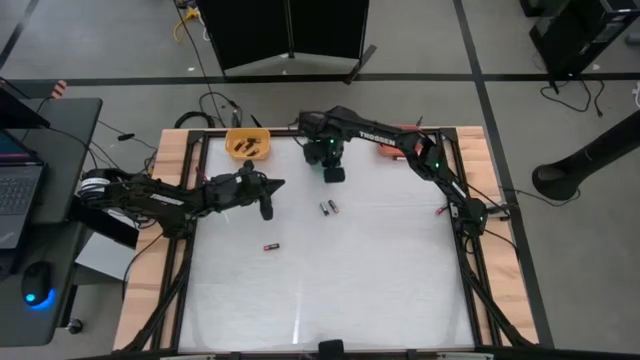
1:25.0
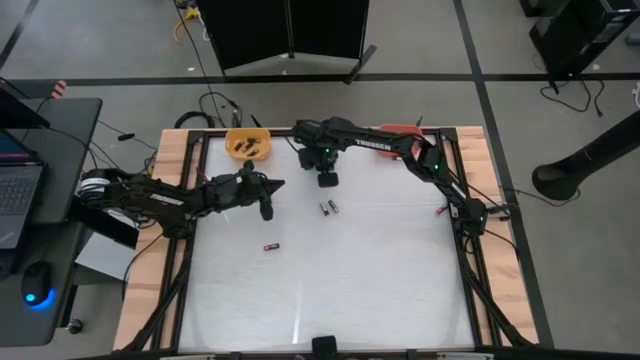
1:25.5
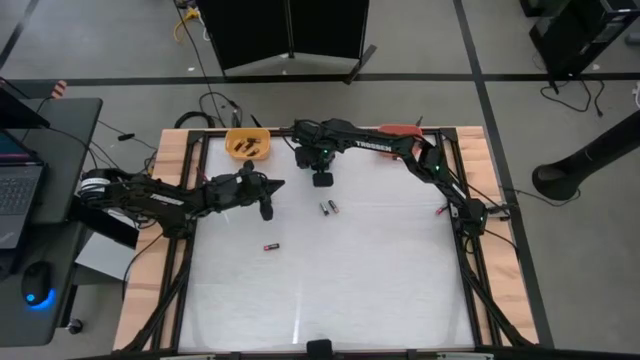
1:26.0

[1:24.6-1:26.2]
Task: Sort batteries
Adjust the green bin

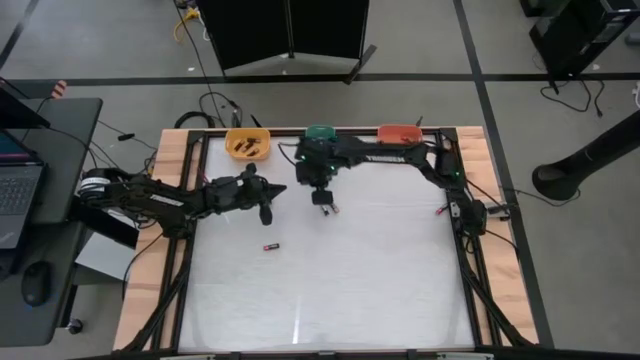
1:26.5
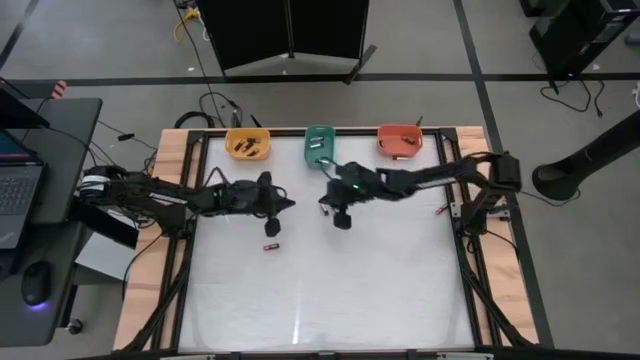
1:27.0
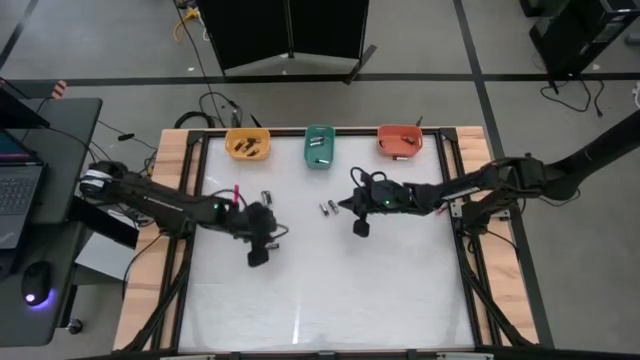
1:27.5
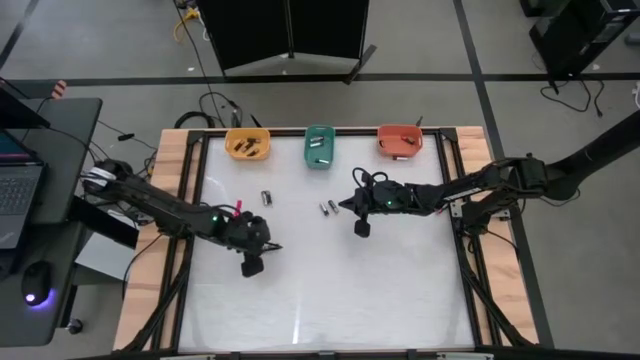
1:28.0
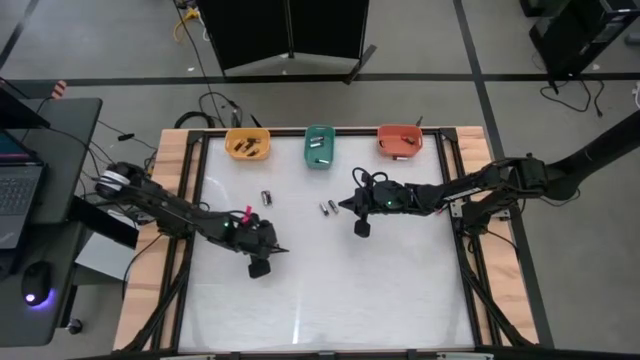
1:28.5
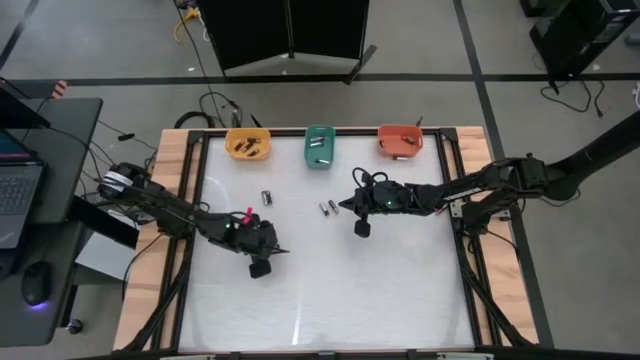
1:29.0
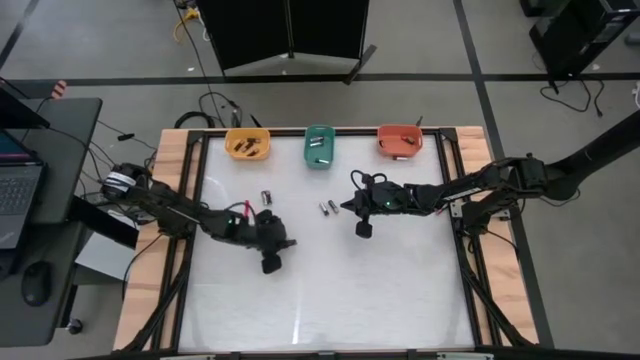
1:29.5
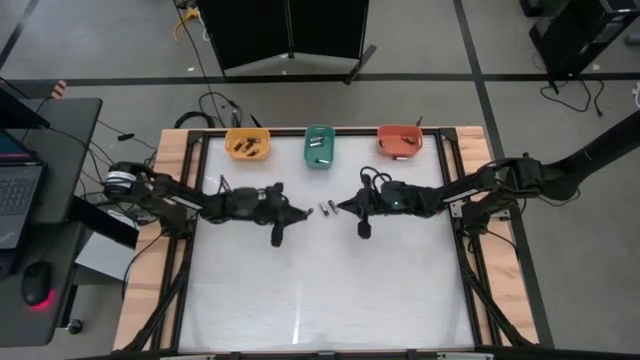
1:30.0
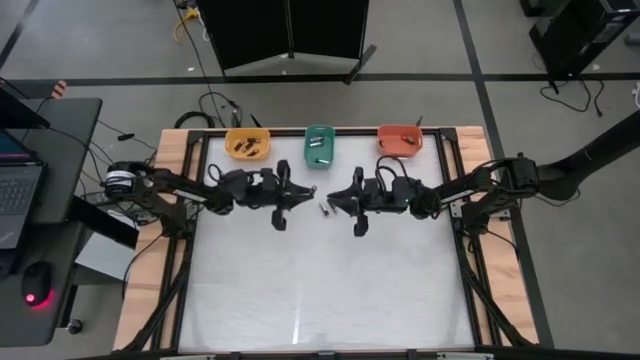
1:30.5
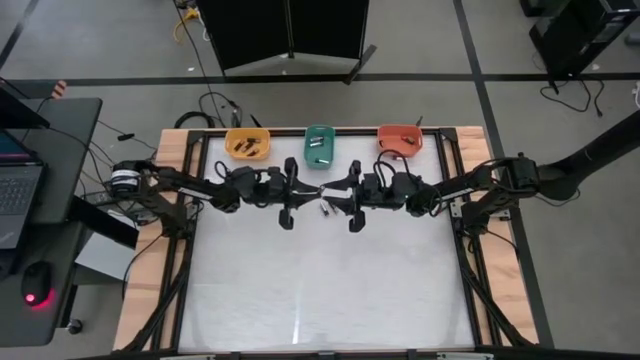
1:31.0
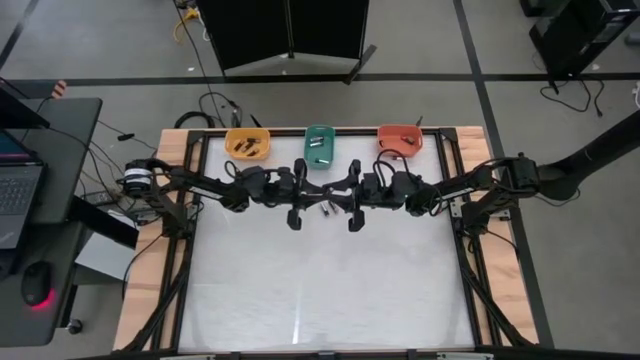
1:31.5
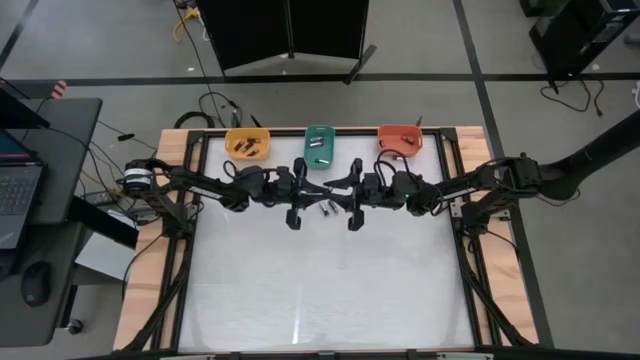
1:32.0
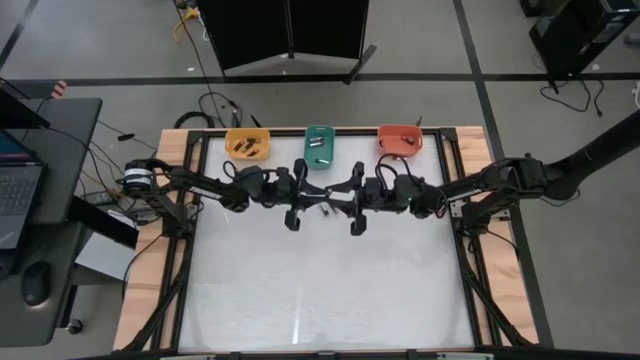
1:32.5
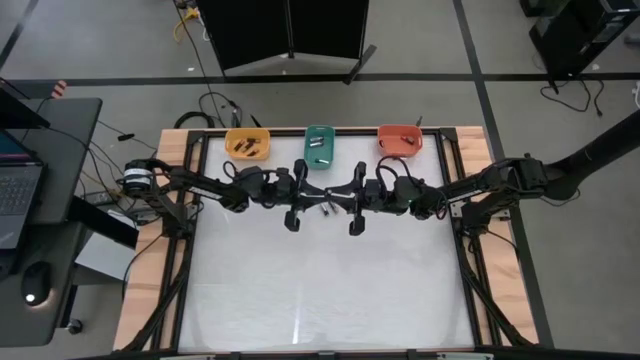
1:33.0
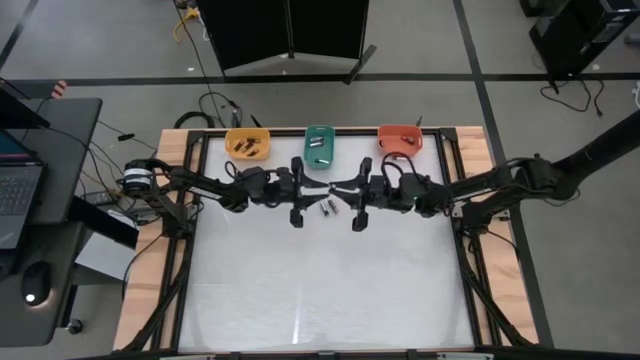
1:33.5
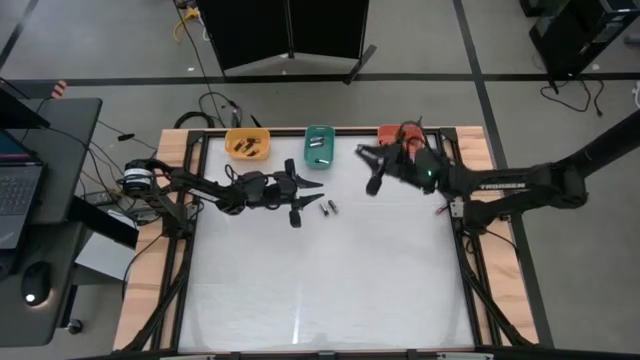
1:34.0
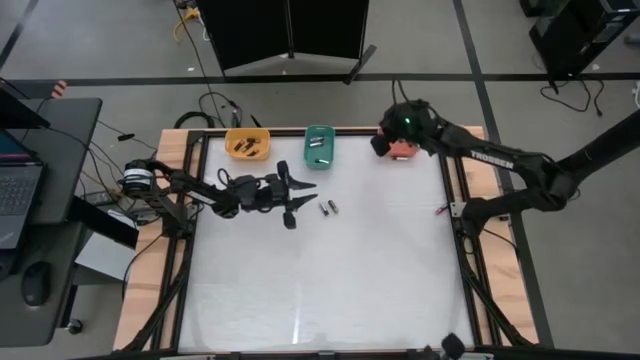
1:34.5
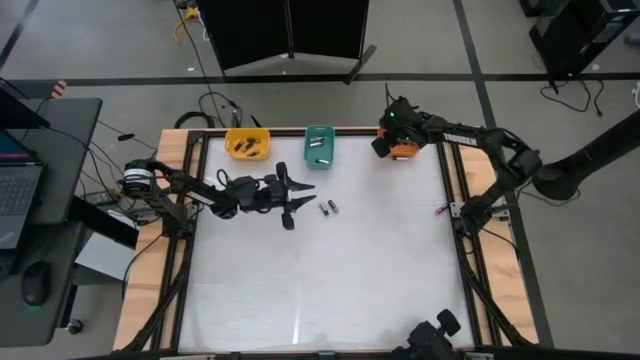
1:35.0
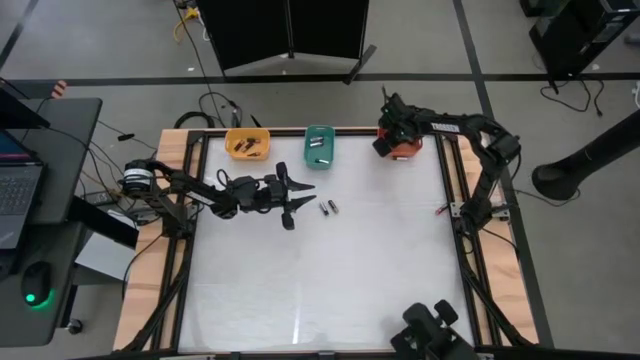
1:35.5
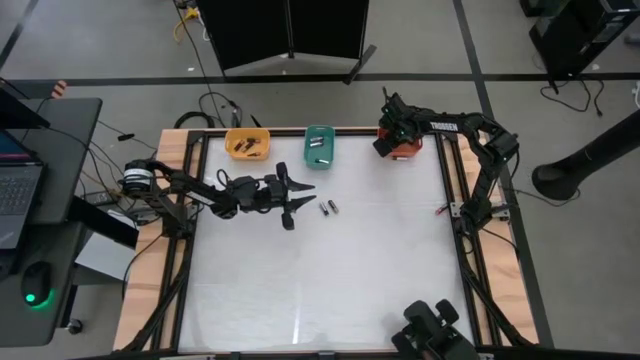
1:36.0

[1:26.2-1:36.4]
Put the red battery into the orange bin

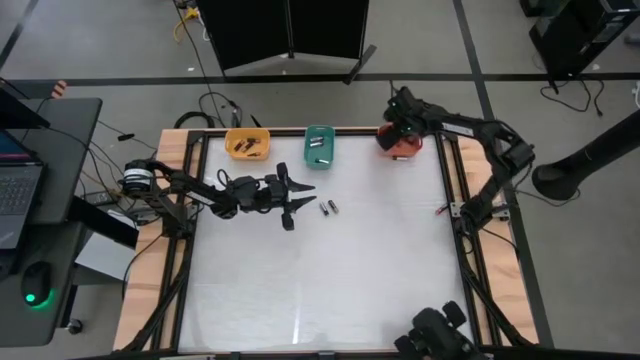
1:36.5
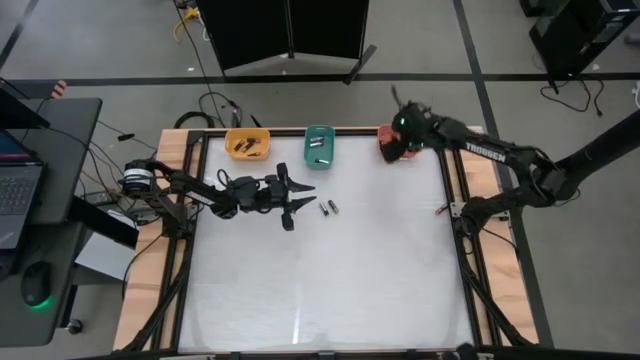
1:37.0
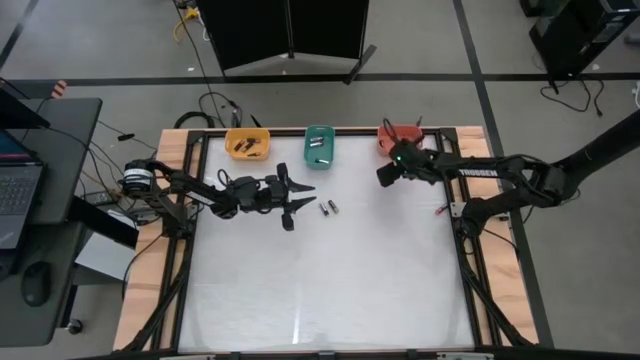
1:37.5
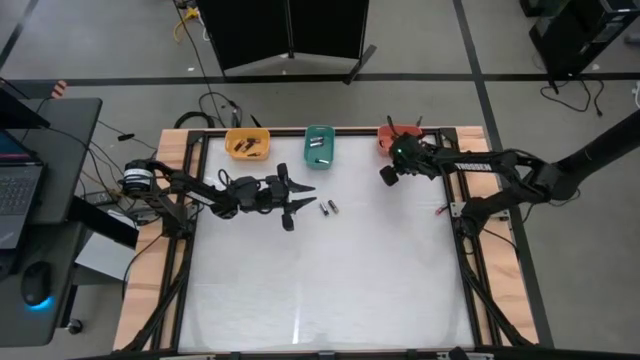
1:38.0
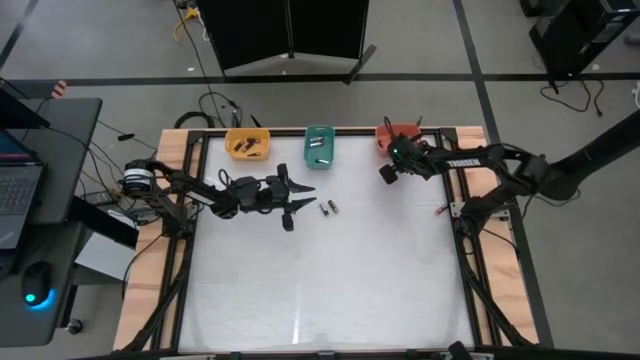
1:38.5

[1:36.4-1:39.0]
Put the silver battery into the green bin

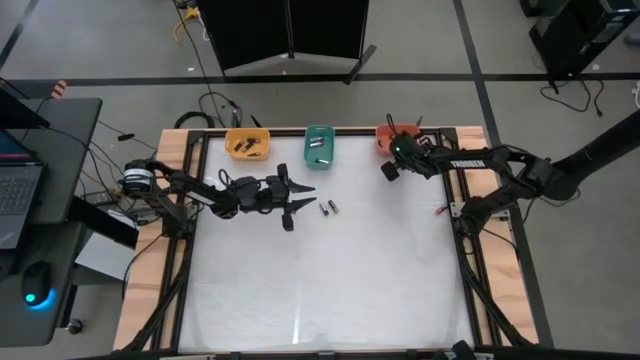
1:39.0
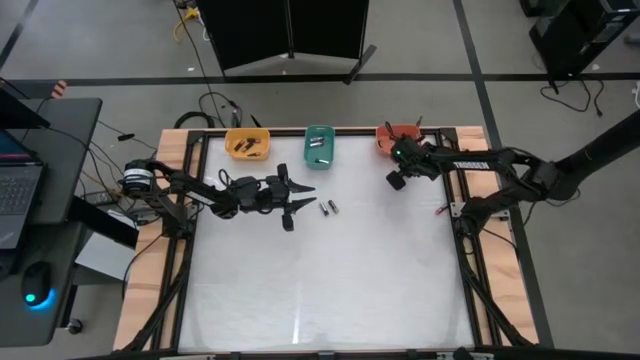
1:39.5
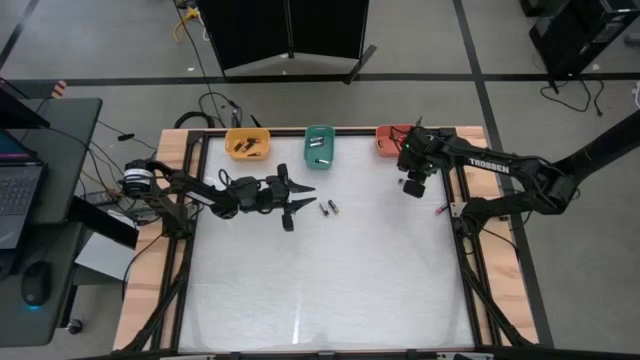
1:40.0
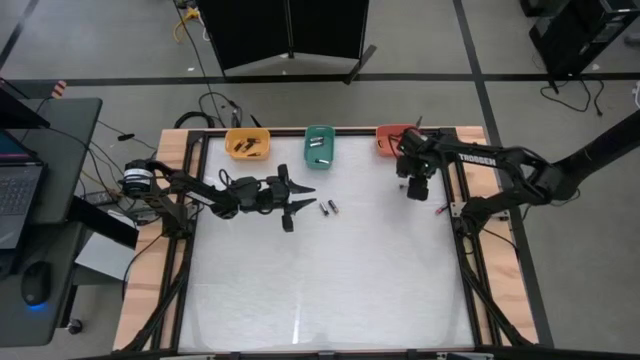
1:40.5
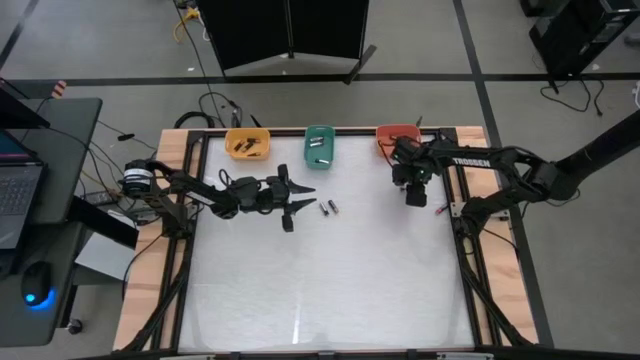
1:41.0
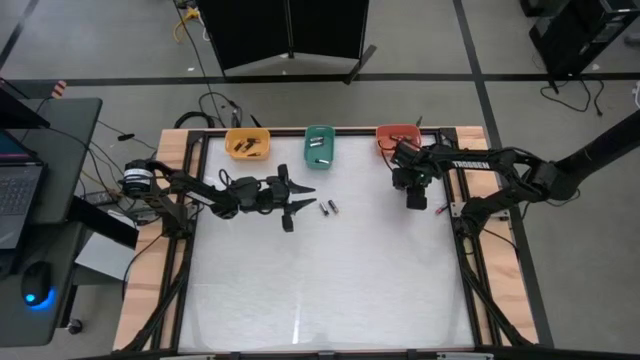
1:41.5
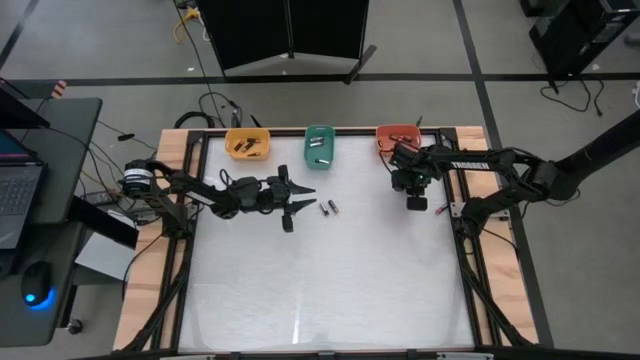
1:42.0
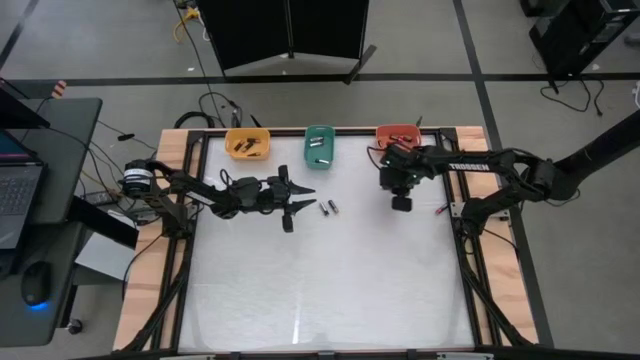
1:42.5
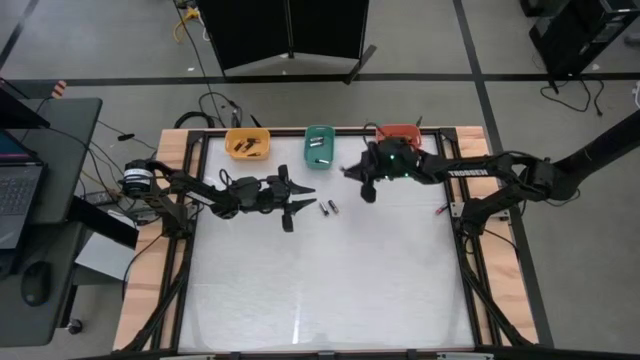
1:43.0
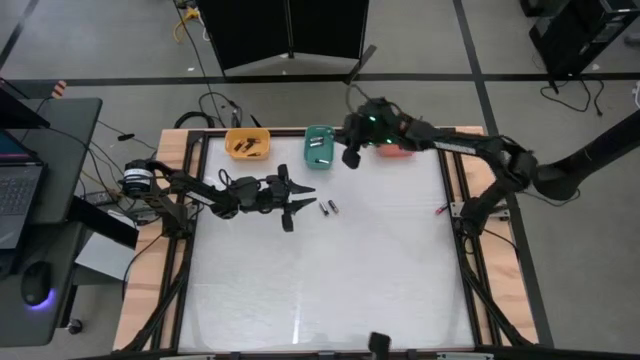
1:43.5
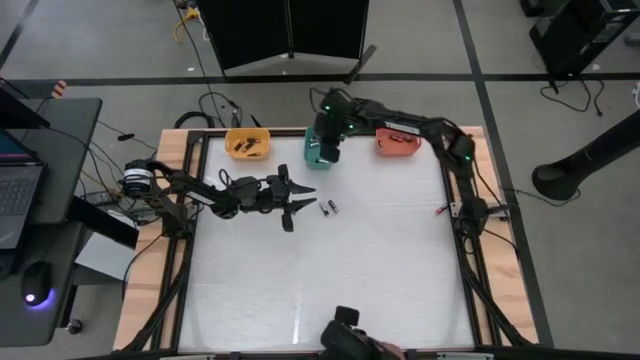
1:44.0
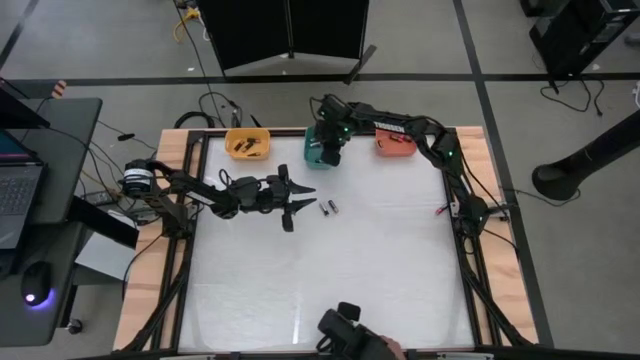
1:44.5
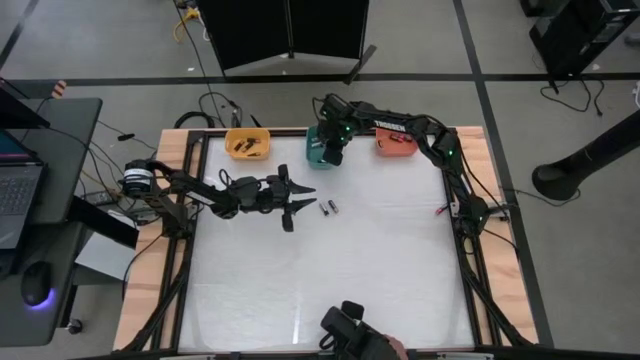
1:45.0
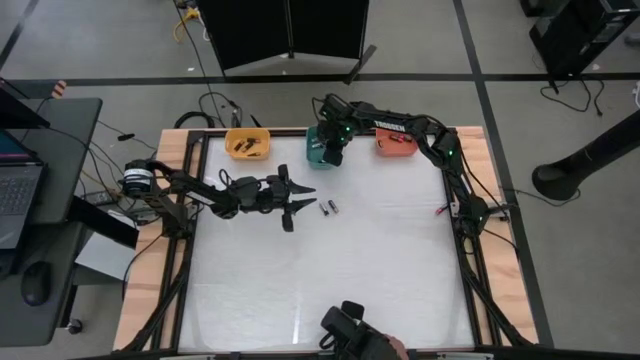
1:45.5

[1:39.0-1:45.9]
Put the silver battery into the green bin

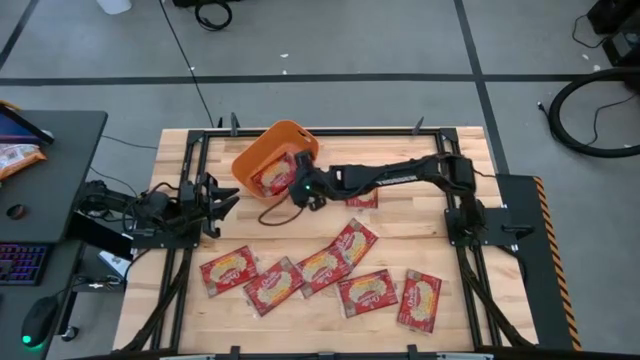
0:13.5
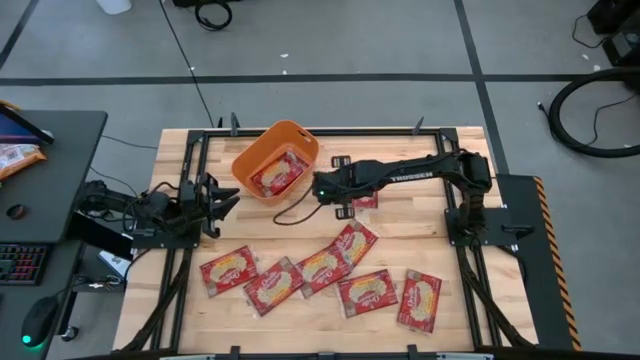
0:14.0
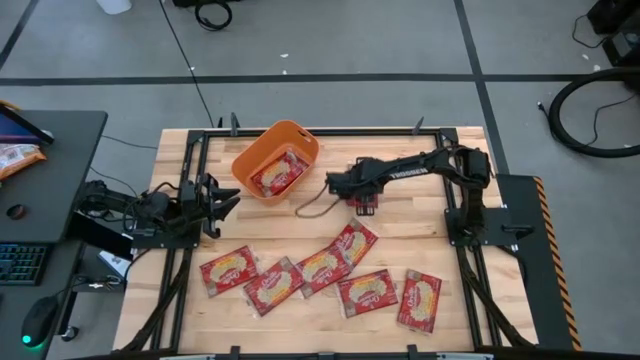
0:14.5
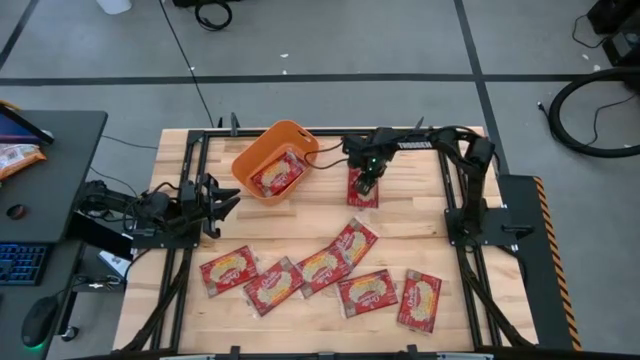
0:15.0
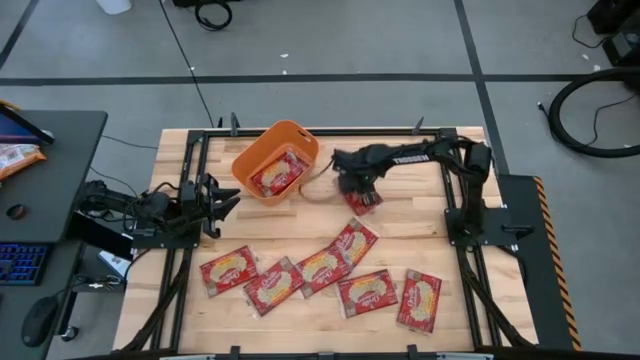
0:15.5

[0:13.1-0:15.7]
Task: Sort popcorn bags into baskets
Put the red popcorn bag into the orange bin
